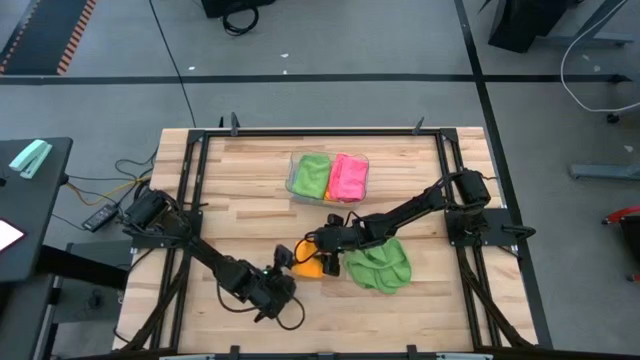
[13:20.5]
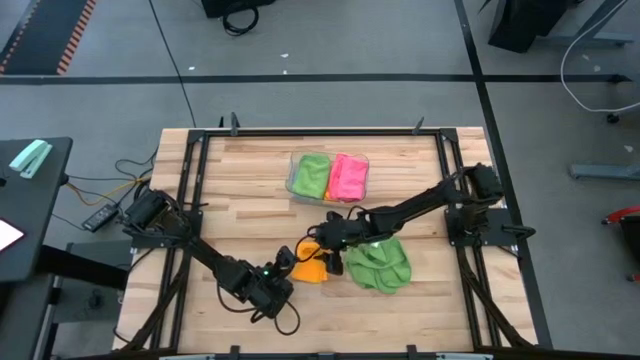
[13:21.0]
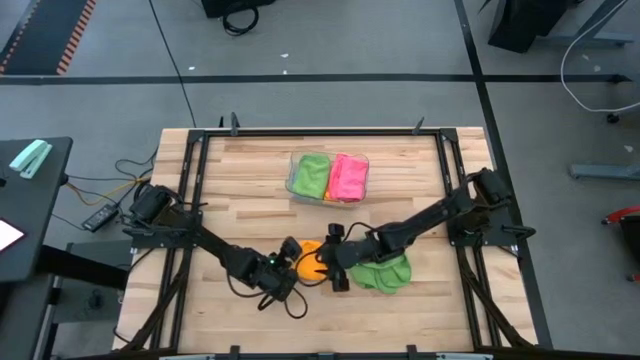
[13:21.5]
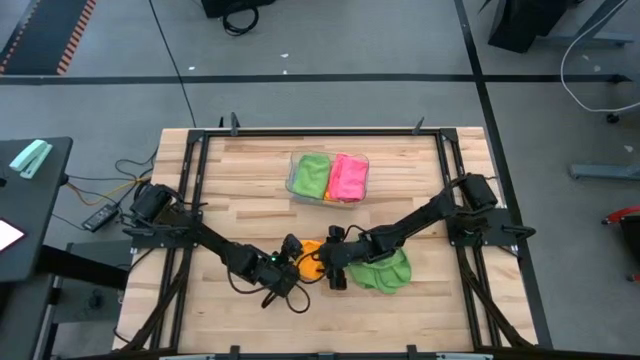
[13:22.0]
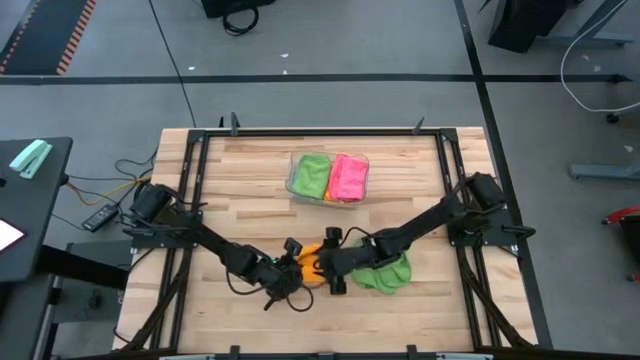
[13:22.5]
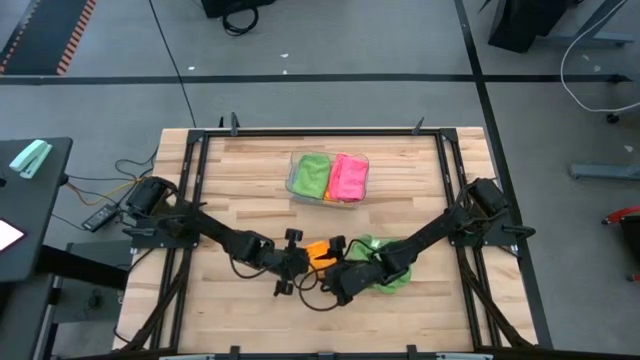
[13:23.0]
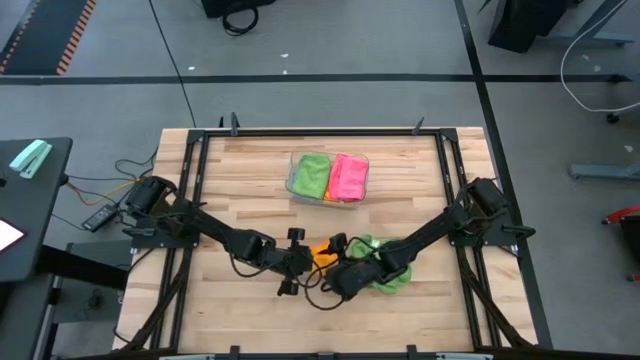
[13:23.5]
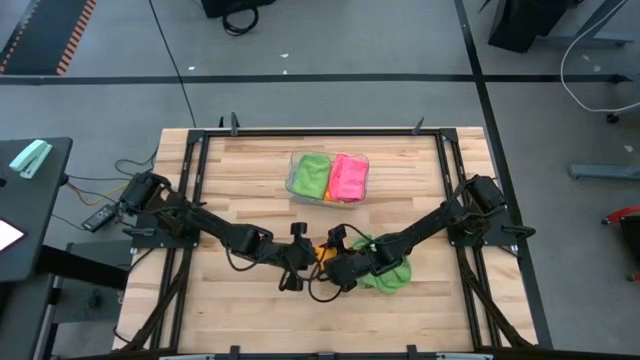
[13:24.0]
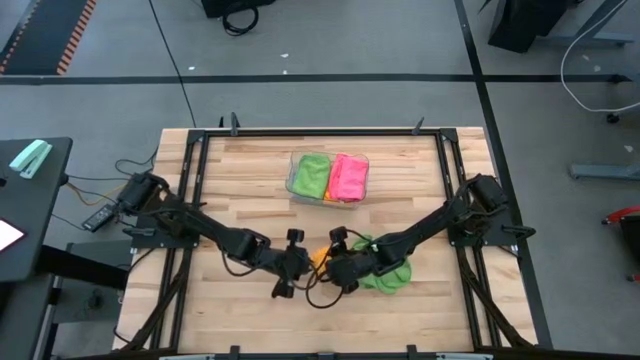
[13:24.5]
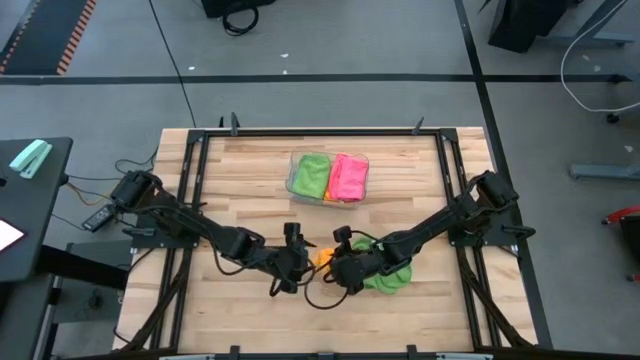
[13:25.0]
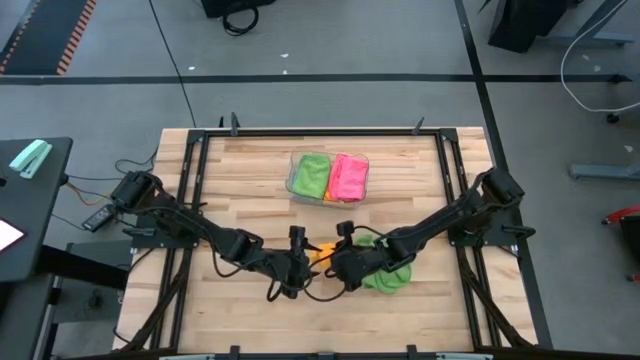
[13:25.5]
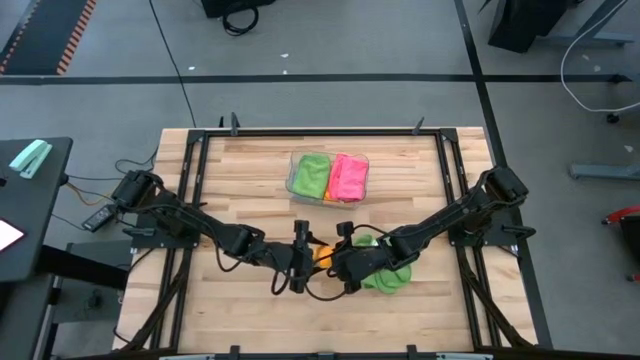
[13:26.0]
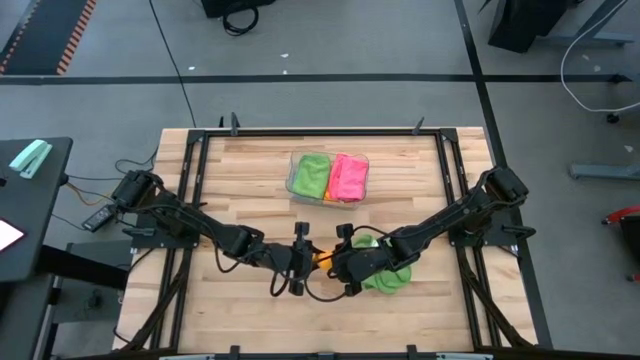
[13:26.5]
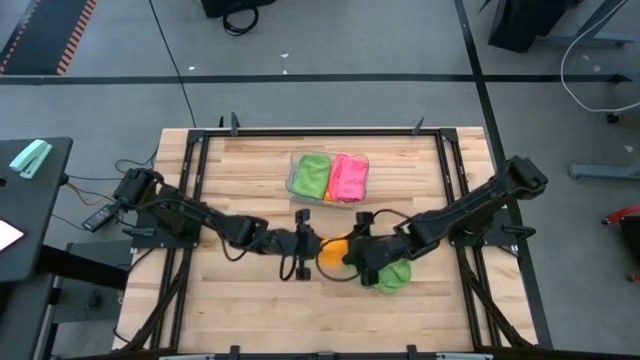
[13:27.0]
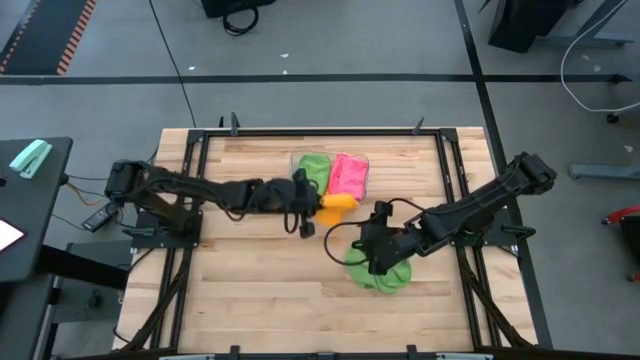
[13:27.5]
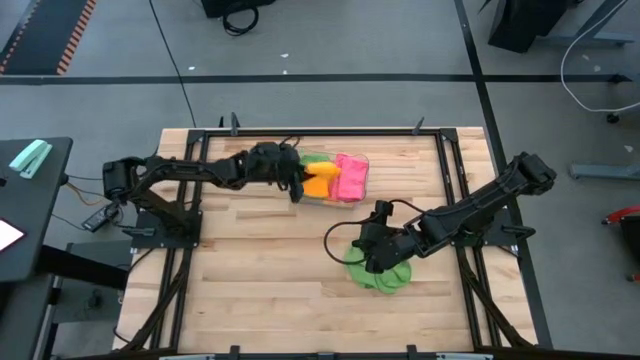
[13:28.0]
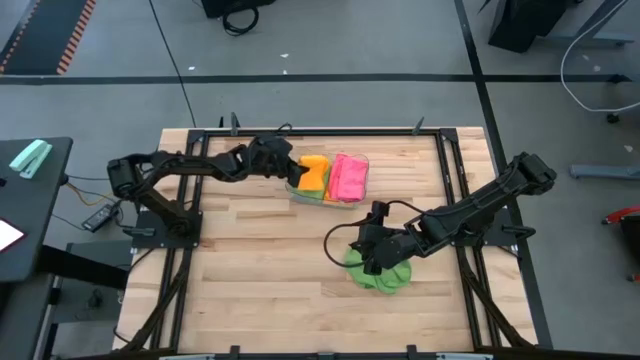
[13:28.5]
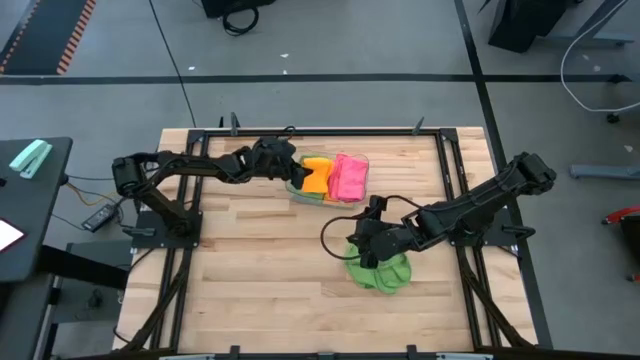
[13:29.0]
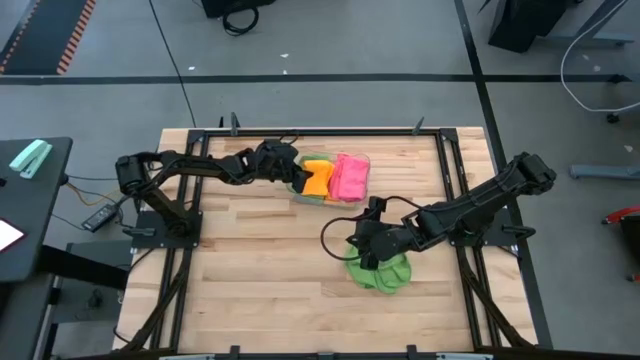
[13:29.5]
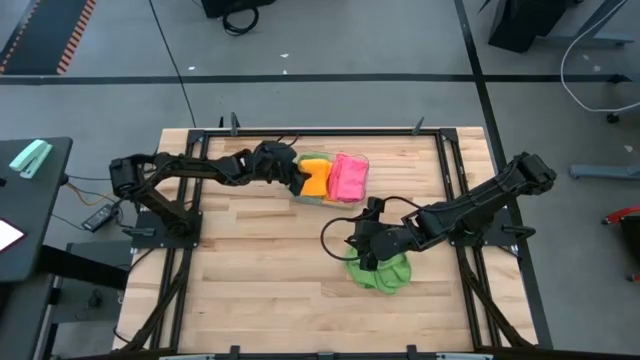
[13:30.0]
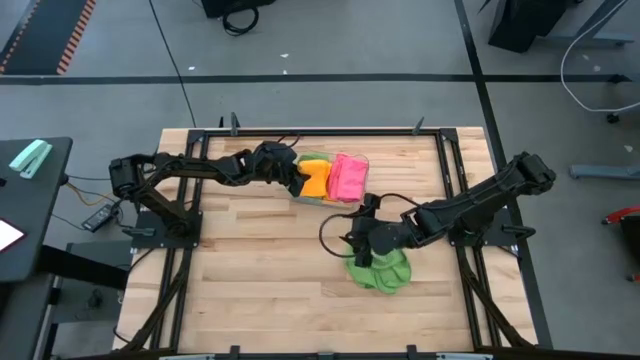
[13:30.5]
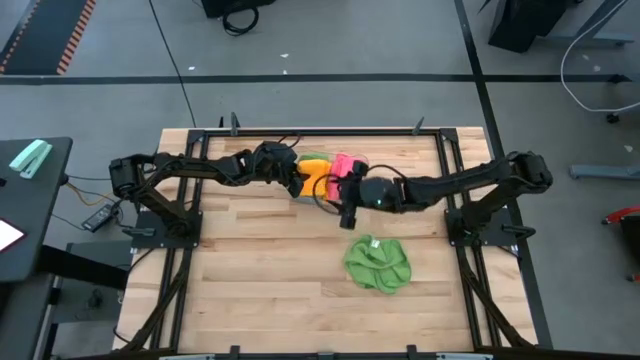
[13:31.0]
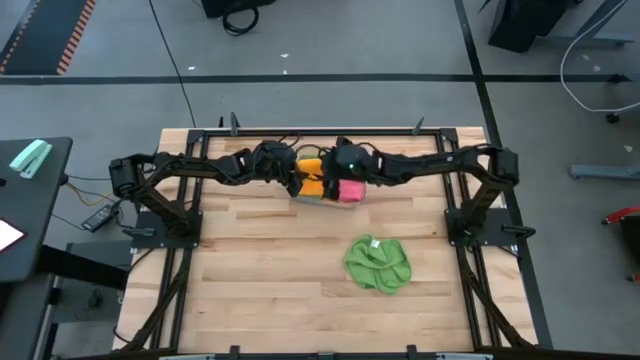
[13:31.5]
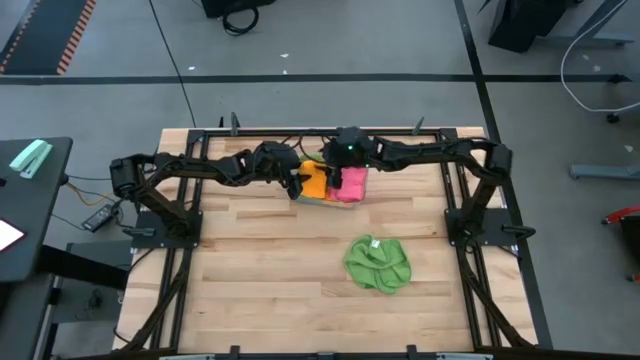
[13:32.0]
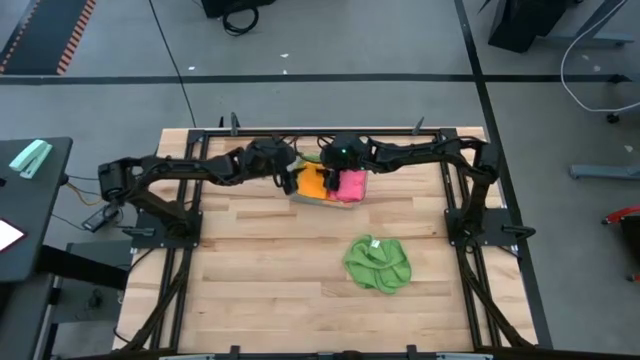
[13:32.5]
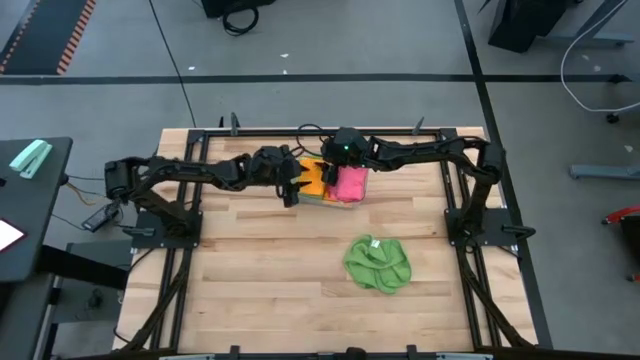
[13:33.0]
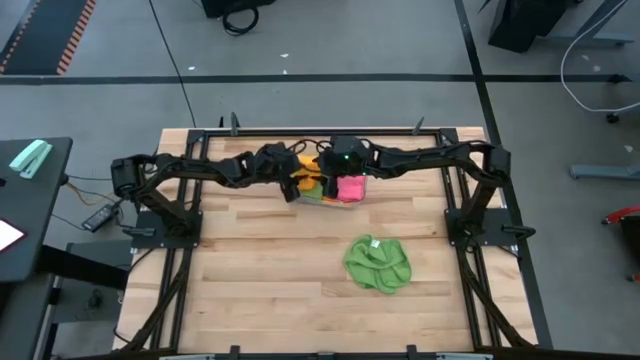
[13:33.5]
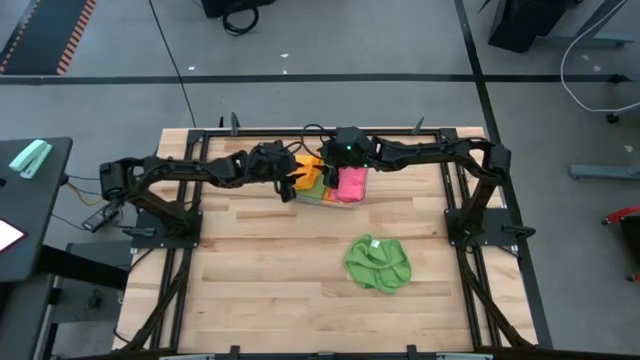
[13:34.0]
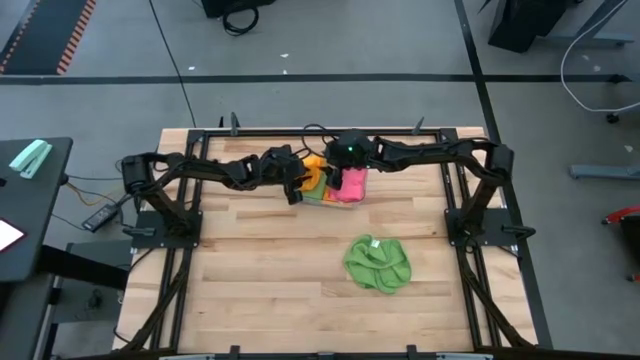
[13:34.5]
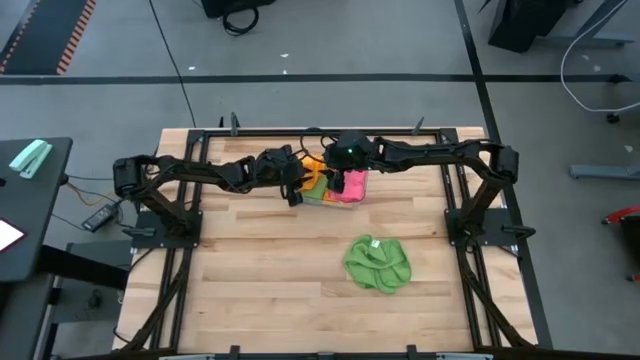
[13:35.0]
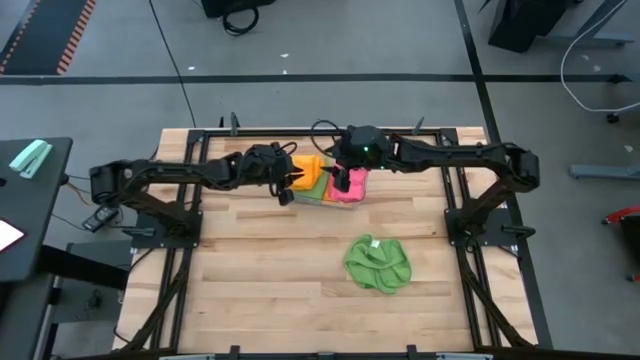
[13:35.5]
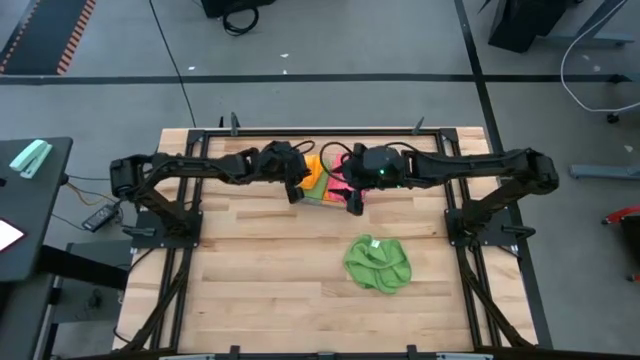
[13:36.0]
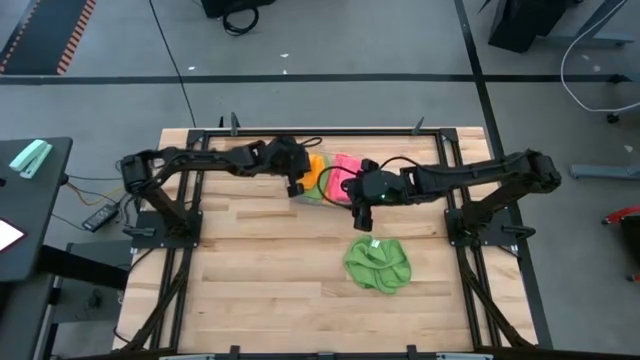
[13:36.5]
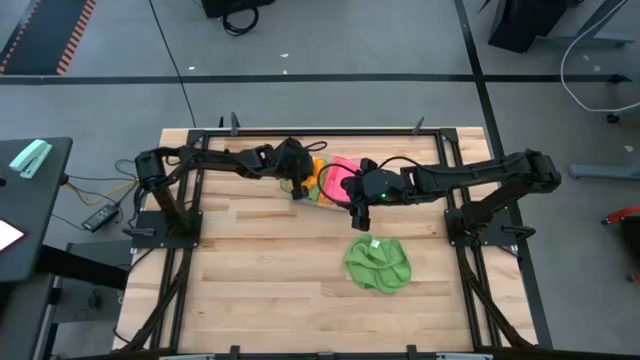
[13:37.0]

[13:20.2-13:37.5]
Task: Fold microfiber towels
Put the folded yellow microfiber cloth into the transparent bin

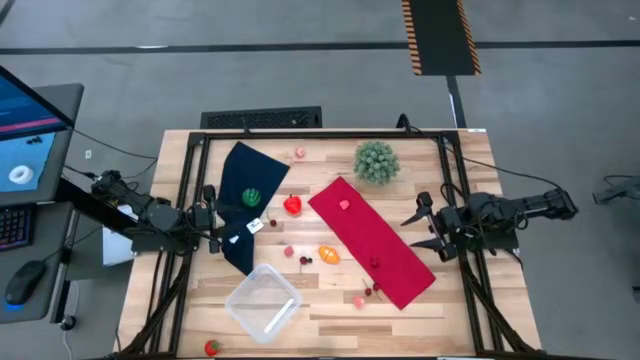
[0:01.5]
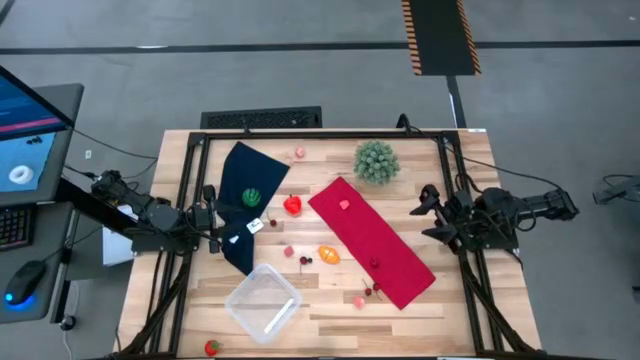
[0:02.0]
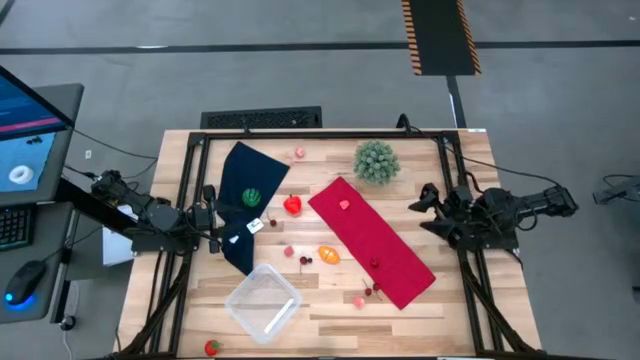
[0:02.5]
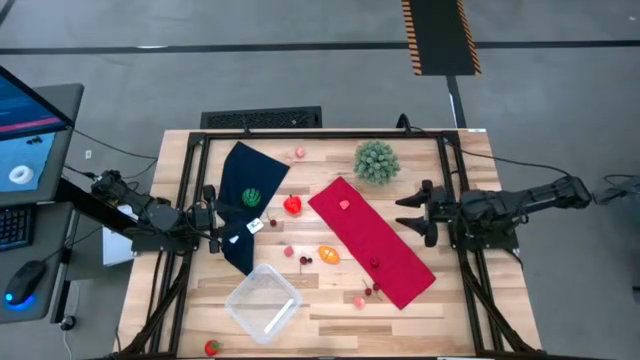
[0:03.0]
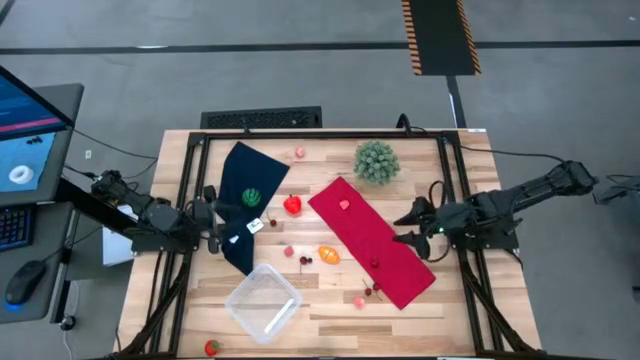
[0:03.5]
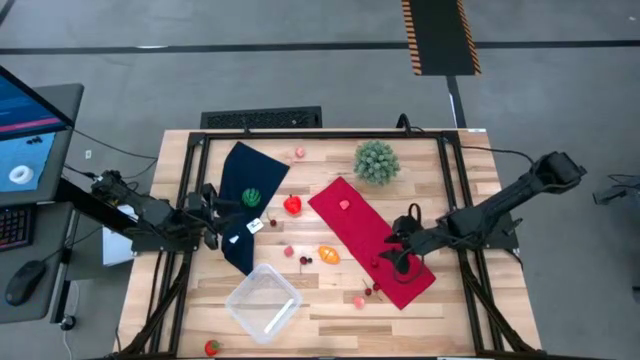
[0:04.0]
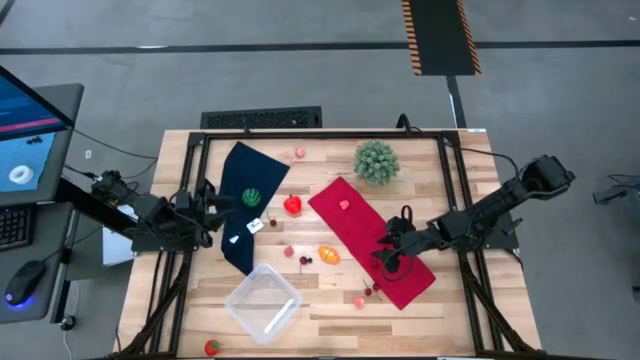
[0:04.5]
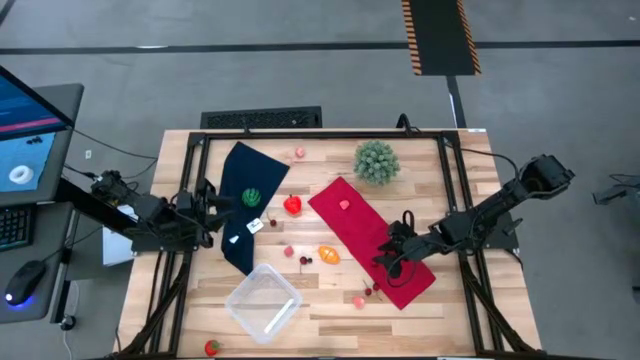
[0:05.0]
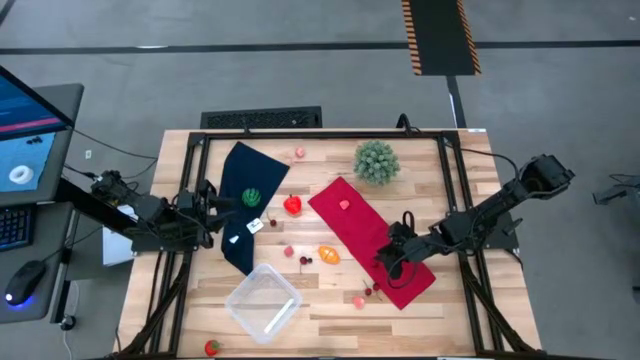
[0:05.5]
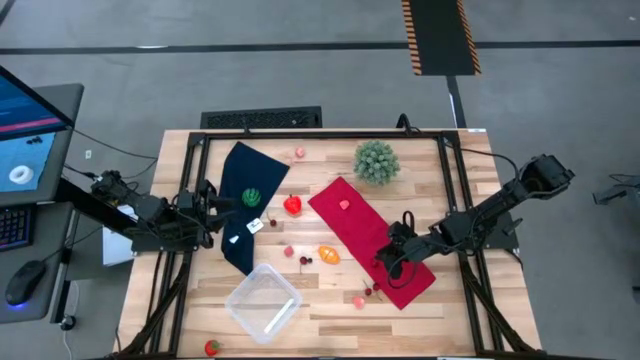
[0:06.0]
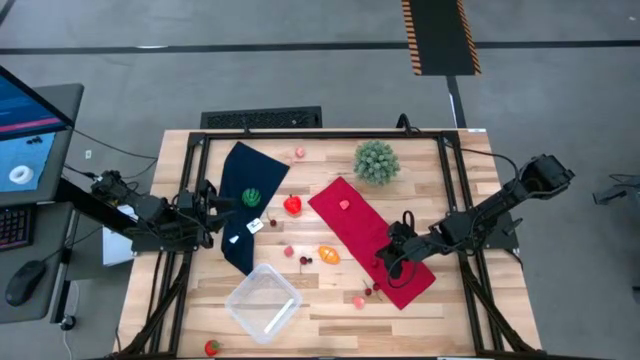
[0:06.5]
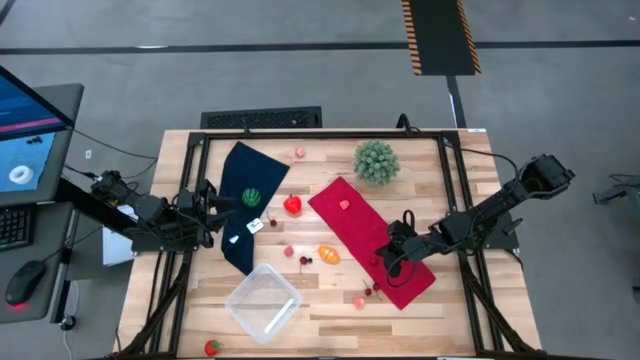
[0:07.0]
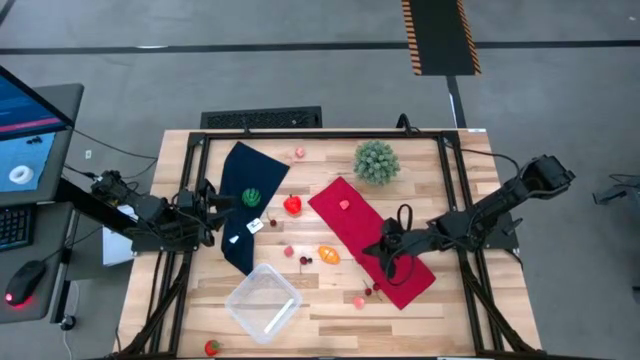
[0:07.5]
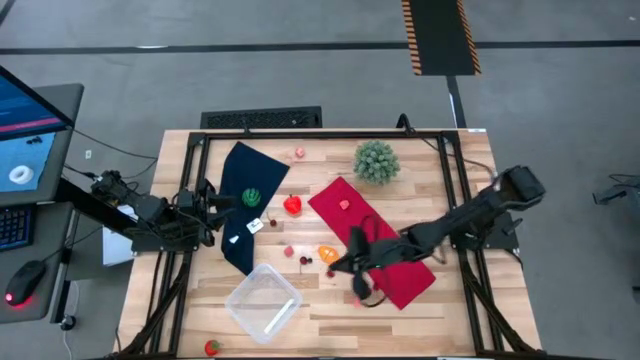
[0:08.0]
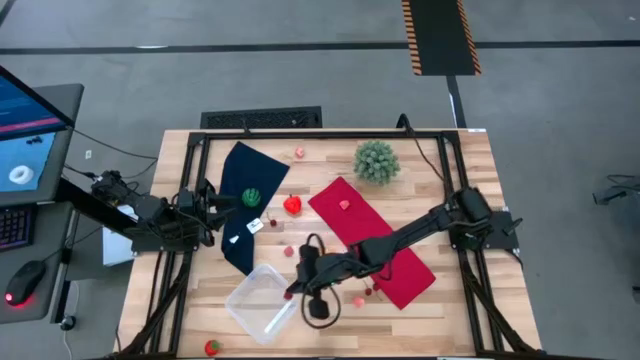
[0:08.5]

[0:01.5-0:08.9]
Task: Pick and placing Produce into tupperware
Put the cherry into the transparent bin
